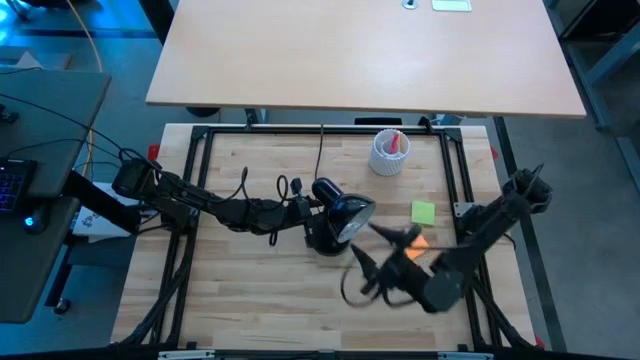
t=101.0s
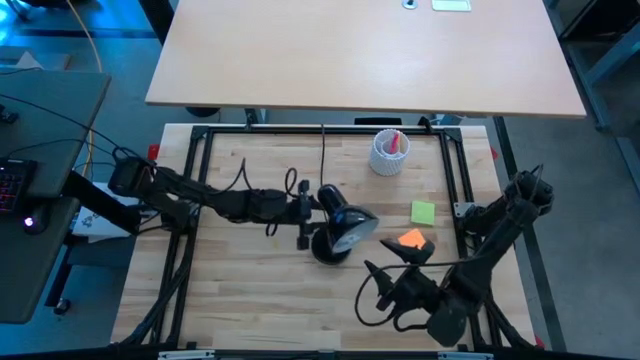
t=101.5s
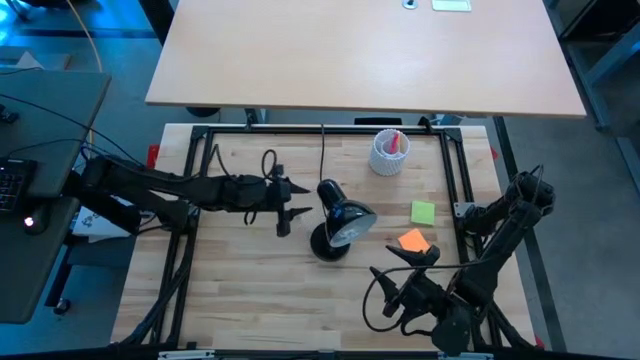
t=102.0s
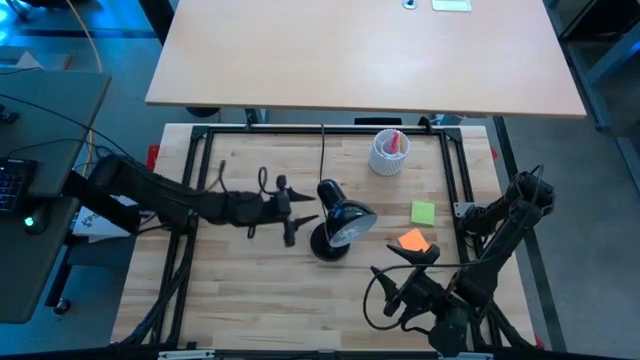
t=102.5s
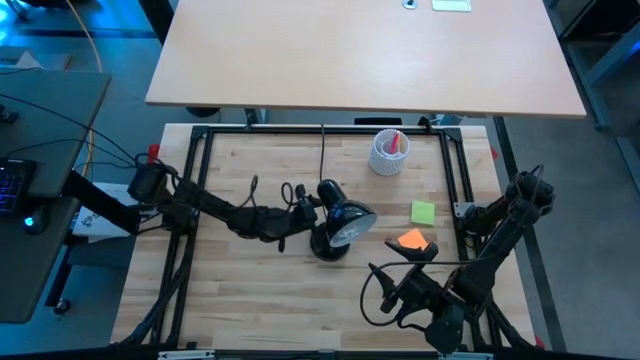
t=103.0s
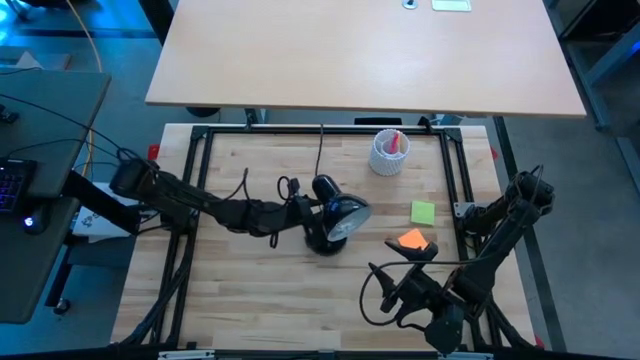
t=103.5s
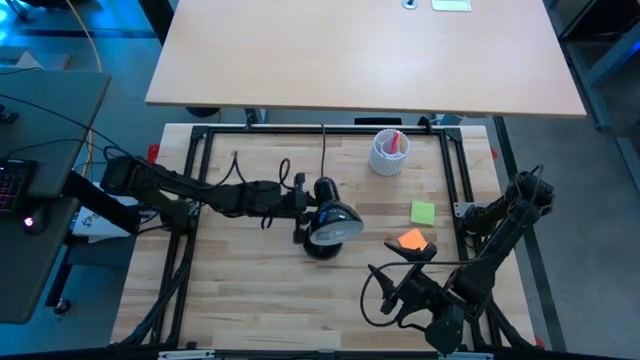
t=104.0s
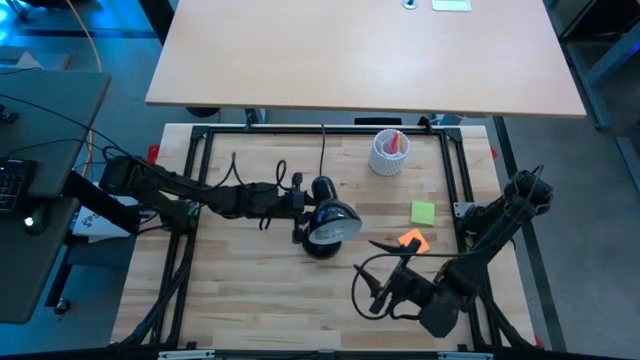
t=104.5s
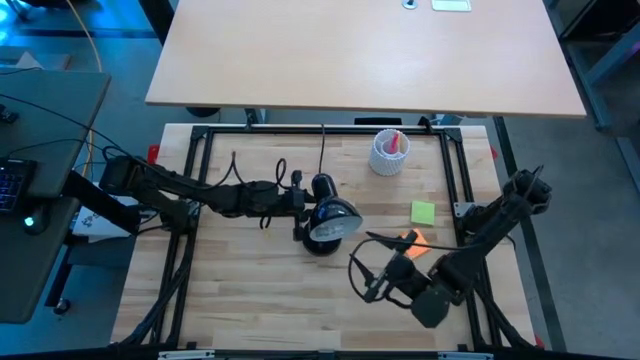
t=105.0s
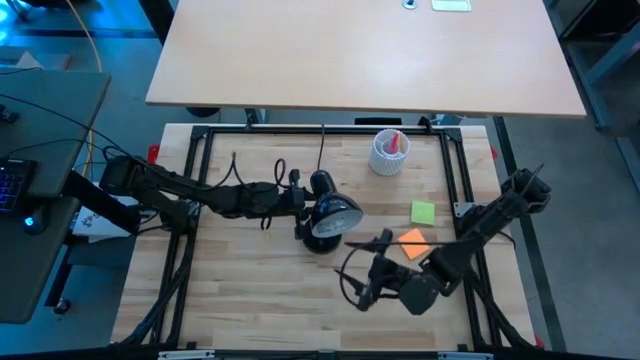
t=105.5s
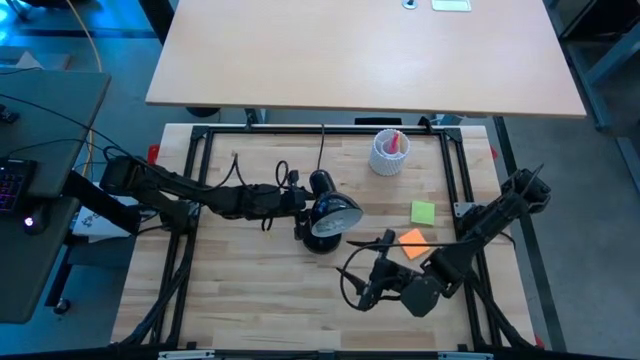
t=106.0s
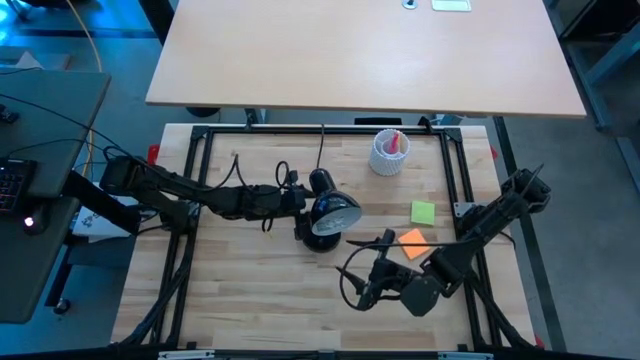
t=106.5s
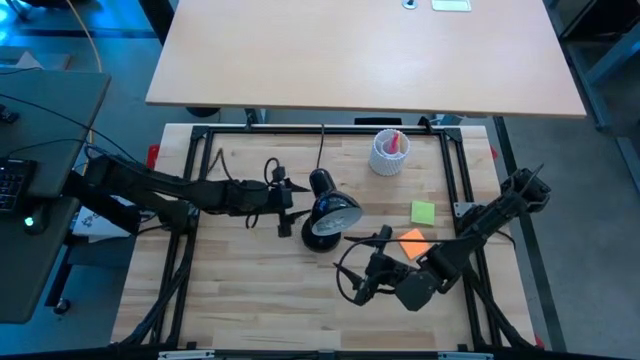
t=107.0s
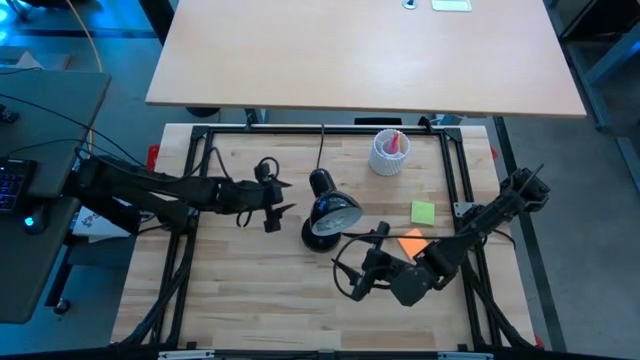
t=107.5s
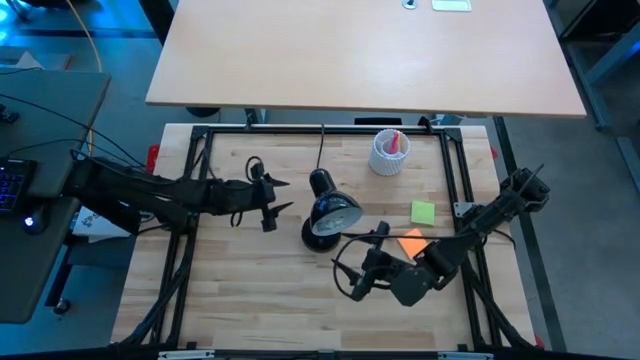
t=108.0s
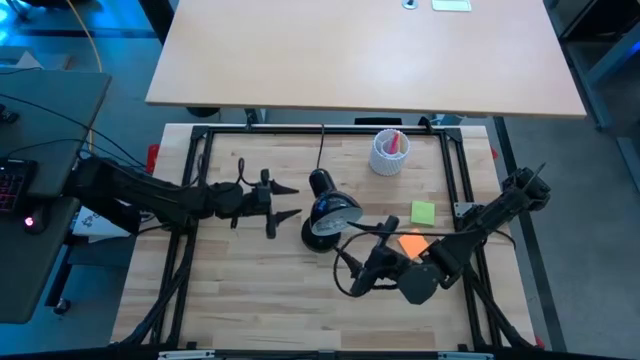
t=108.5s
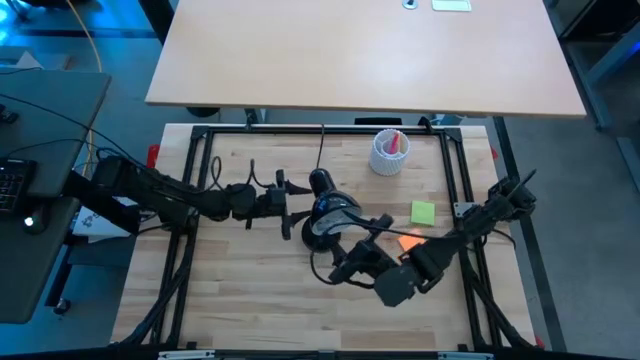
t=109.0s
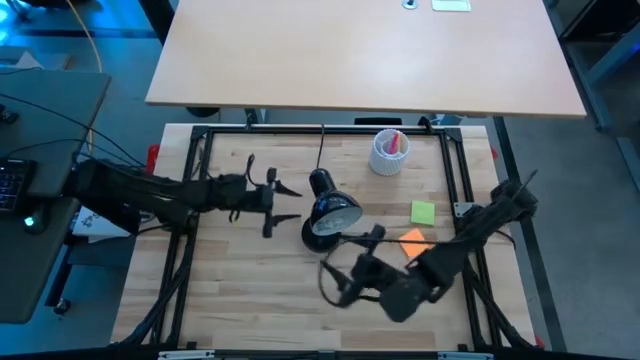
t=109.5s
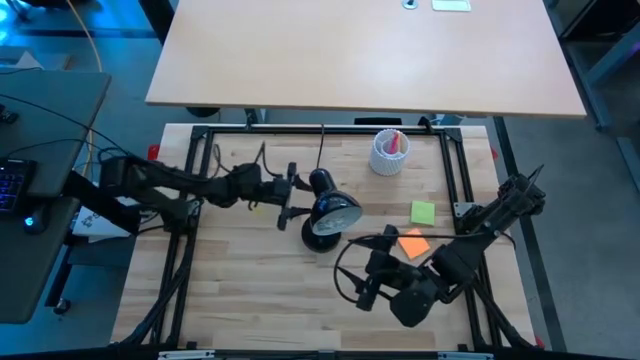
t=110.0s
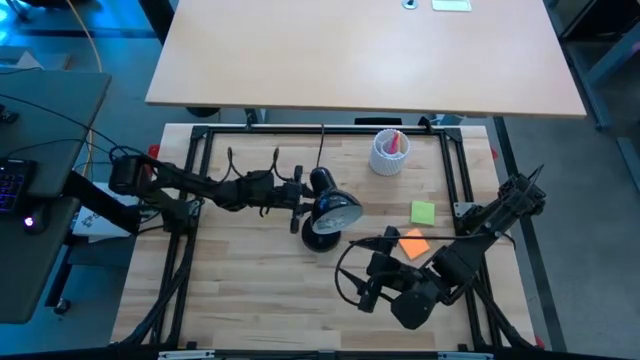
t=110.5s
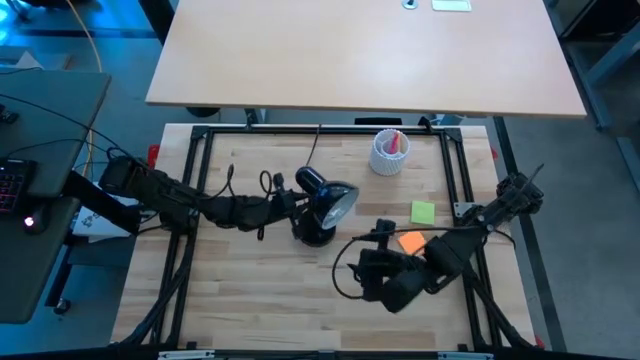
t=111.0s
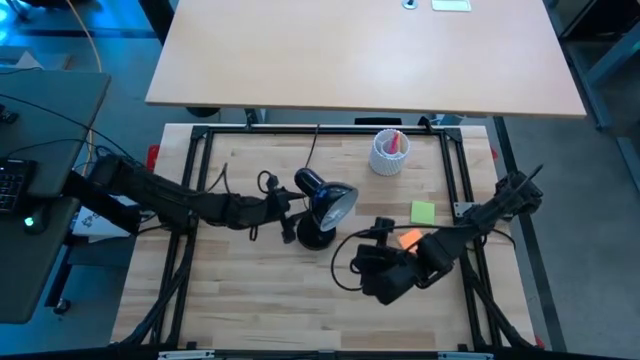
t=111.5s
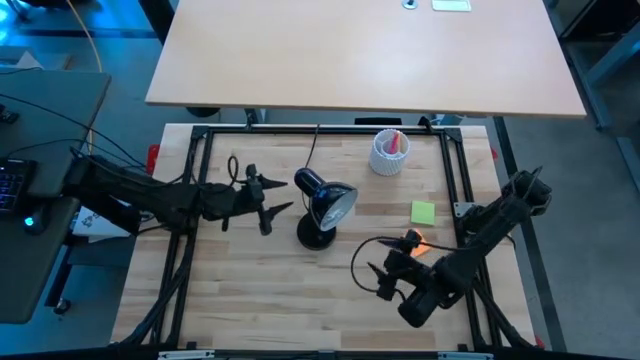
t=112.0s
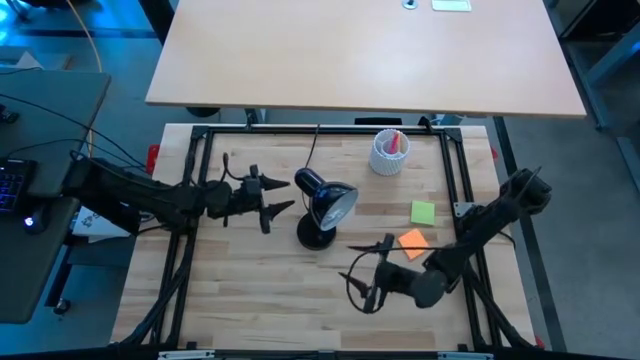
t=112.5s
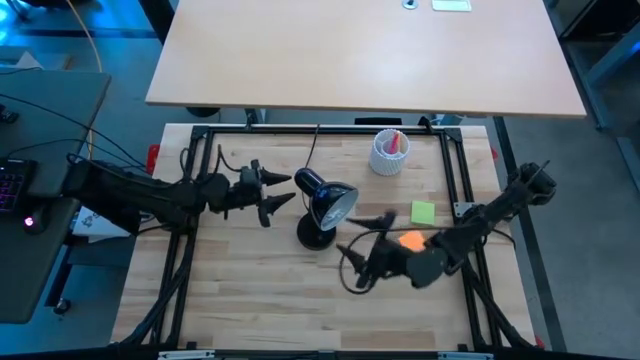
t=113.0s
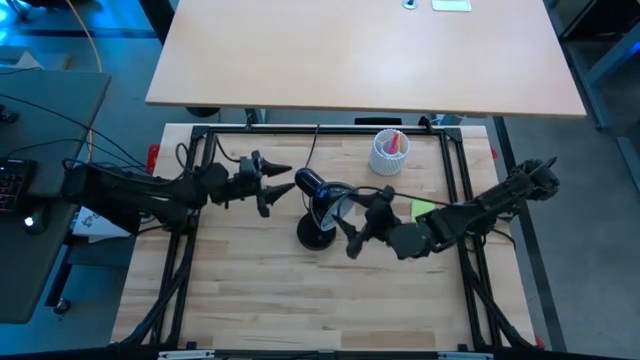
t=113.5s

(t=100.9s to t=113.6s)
Task: Screw lightbulb
Remove the lightbulb from the desk lamp

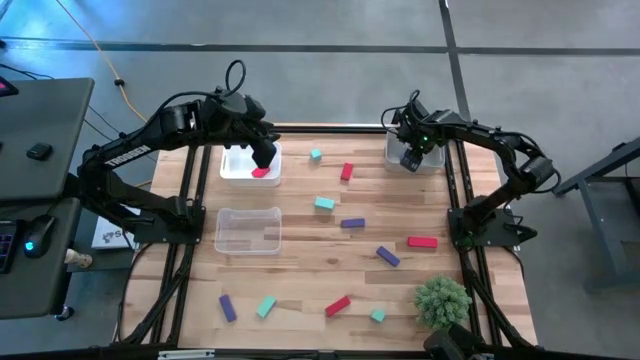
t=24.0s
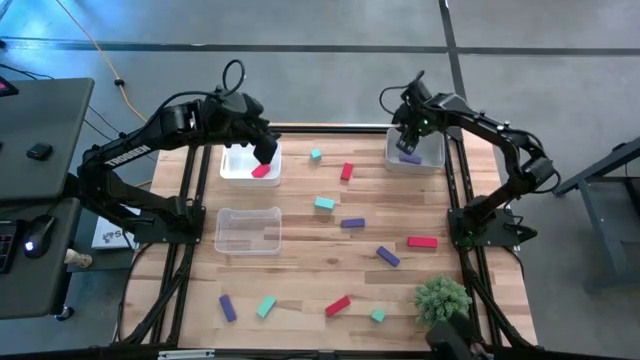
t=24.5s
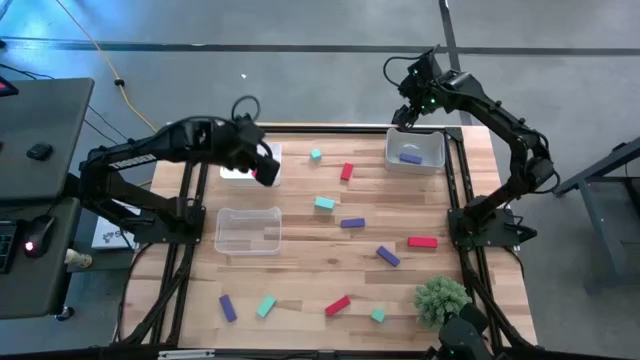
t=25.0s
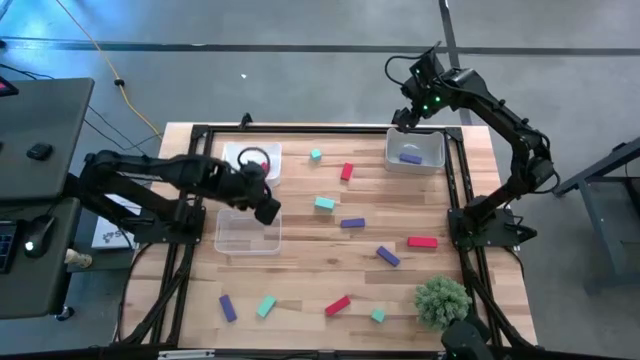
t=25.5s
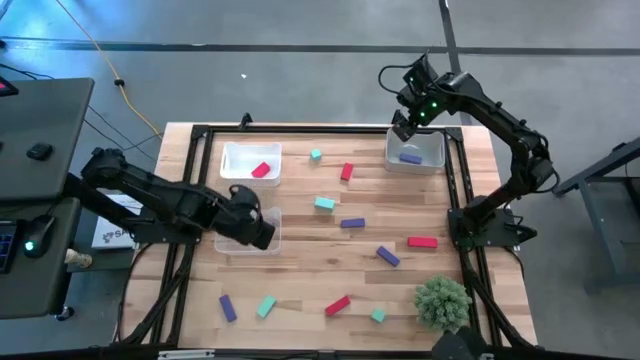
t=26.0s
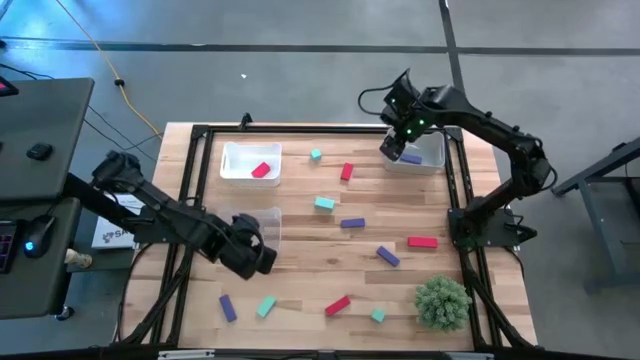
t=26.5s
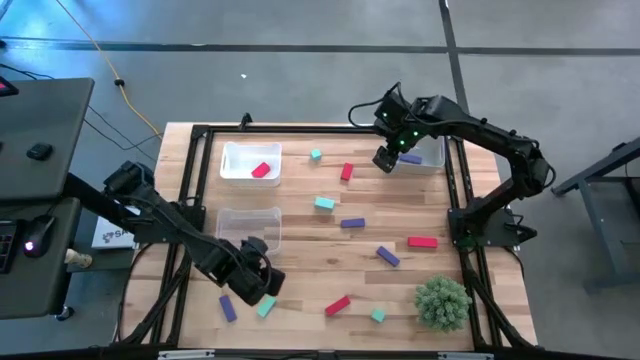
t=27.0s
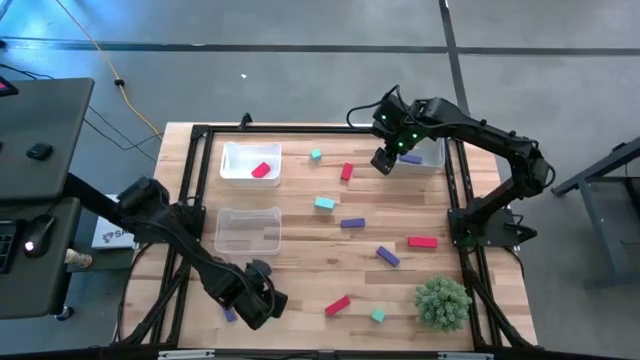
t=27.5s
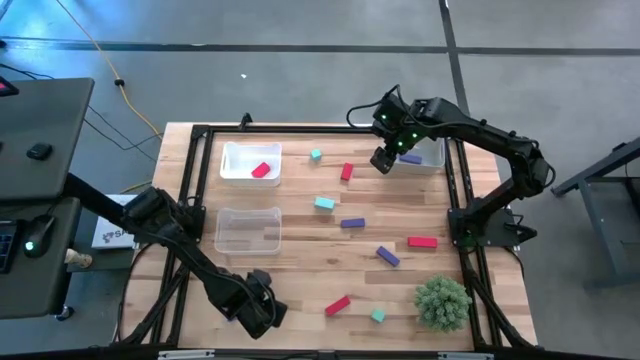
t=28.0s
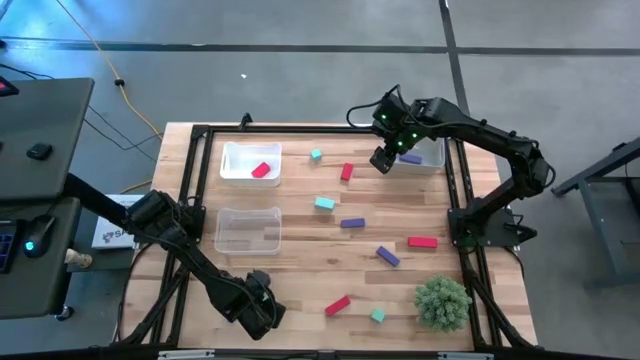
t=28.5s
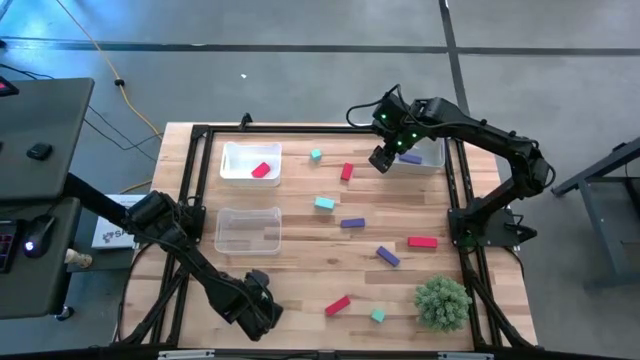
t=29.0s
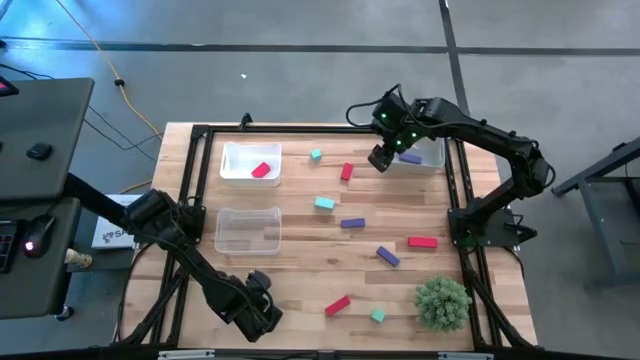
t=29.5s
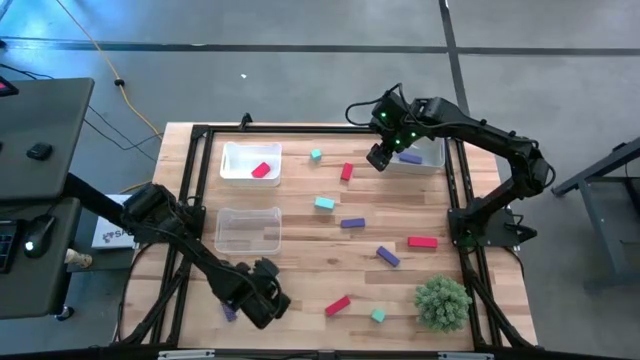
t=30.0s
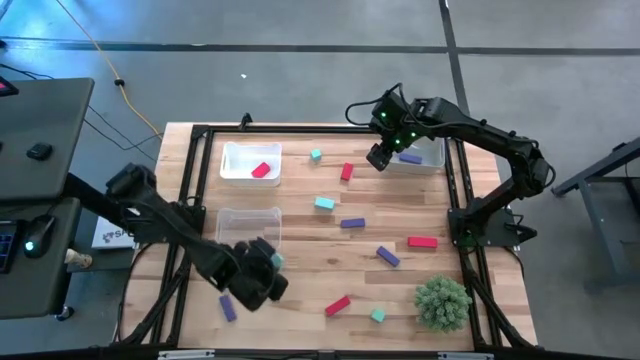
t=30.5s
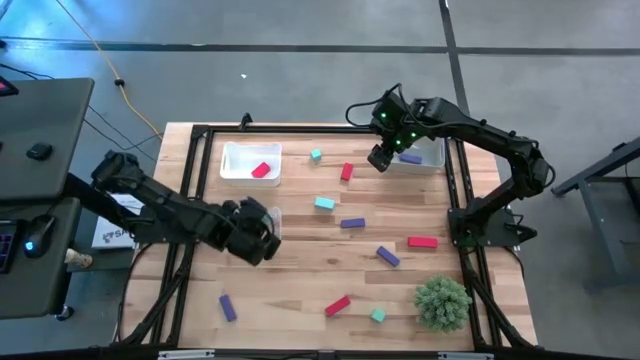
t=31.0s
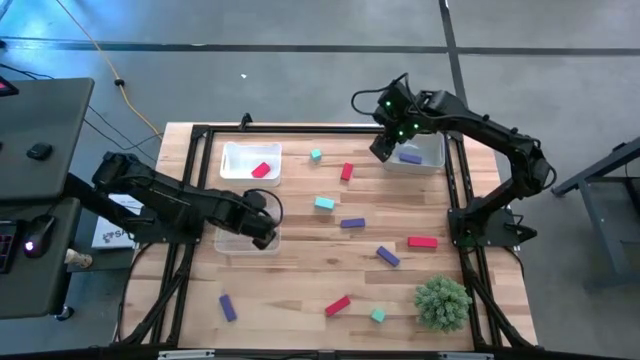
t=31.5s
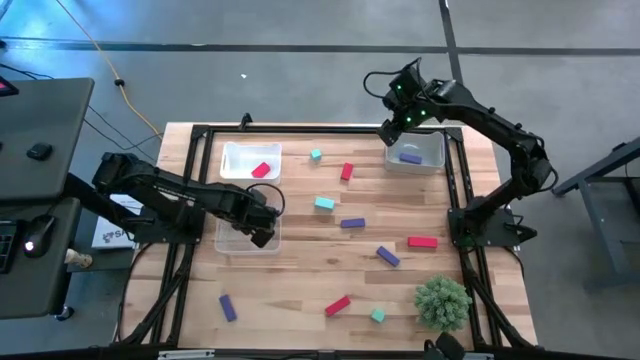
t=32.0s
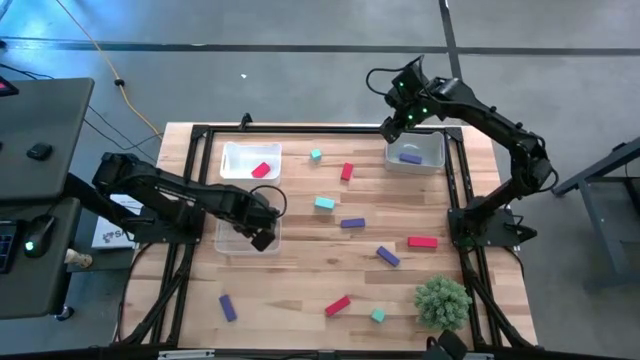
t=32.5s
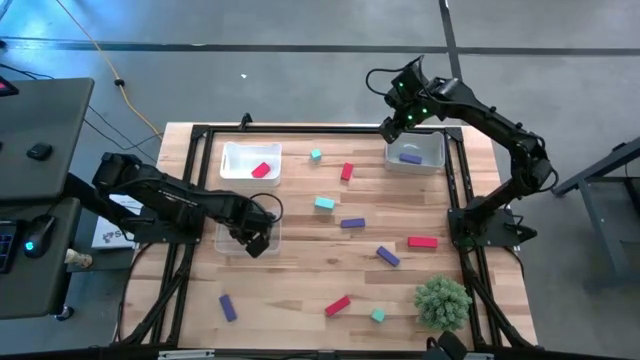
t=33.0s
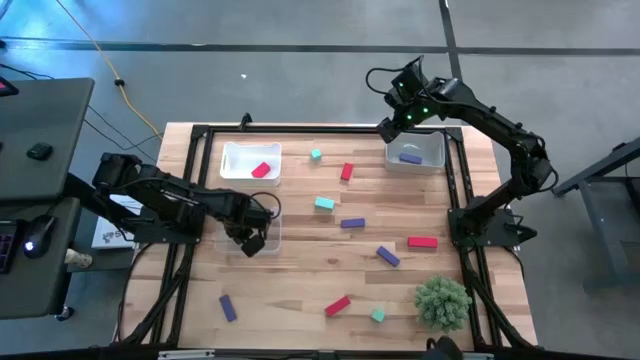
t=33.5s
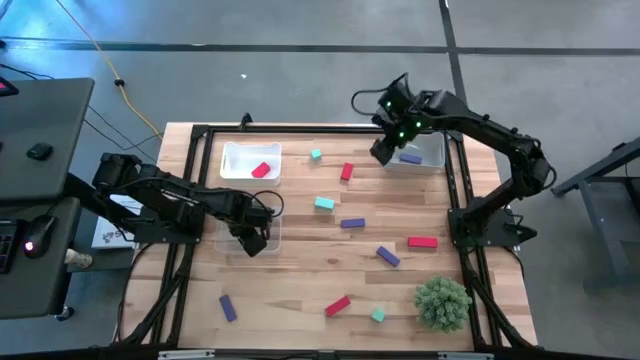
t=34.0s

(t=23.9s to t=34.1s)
Task: Sort & place blocks by color
Put the light blue block into the transparent bin
